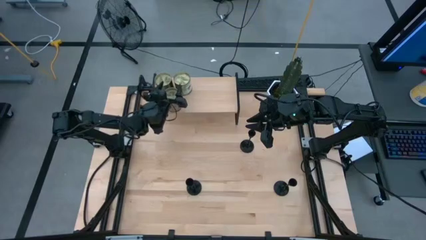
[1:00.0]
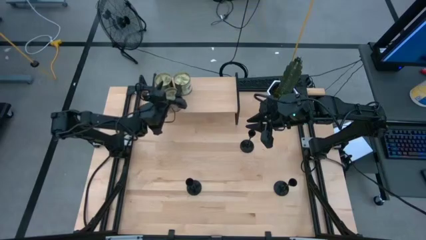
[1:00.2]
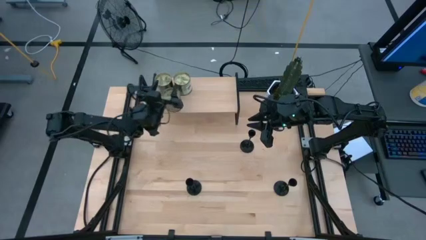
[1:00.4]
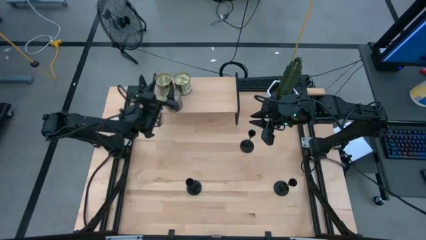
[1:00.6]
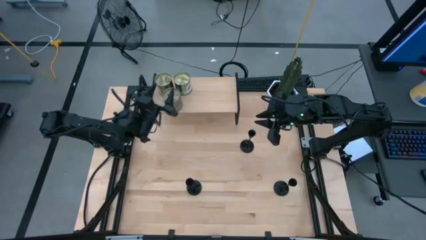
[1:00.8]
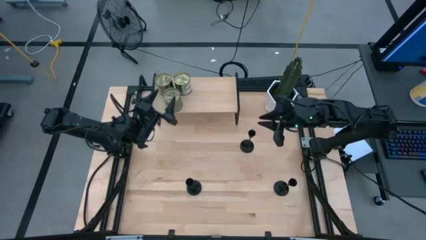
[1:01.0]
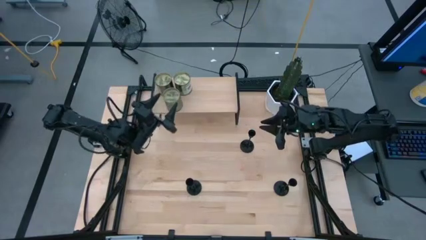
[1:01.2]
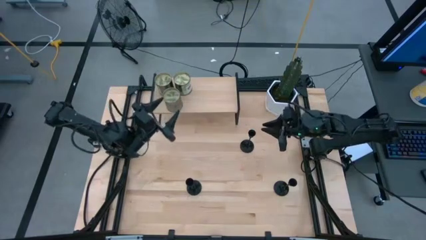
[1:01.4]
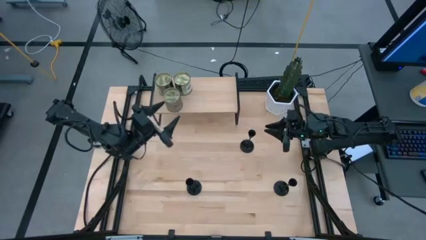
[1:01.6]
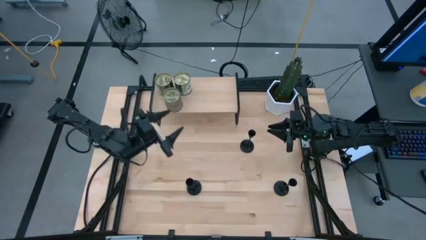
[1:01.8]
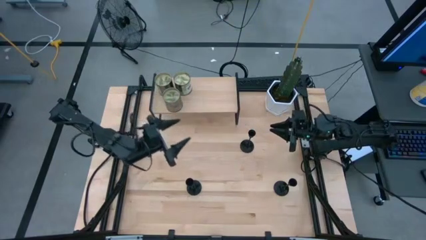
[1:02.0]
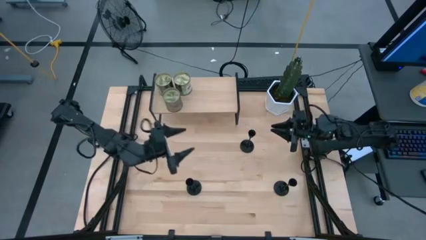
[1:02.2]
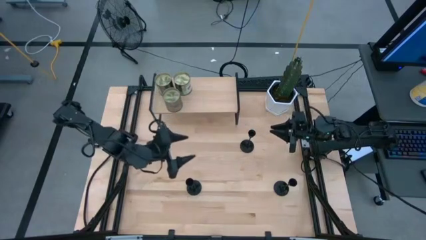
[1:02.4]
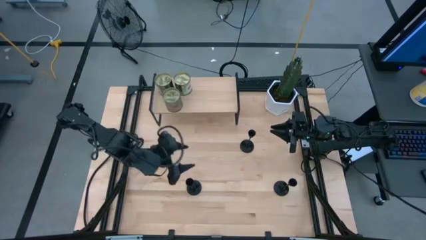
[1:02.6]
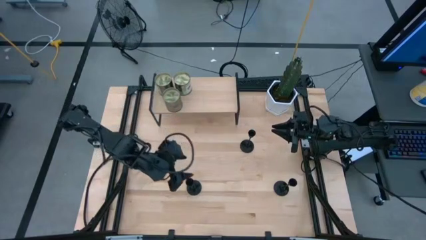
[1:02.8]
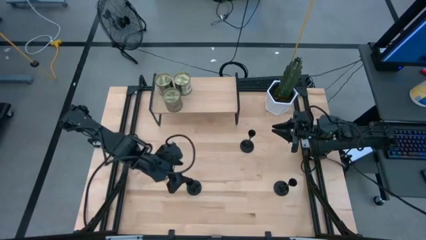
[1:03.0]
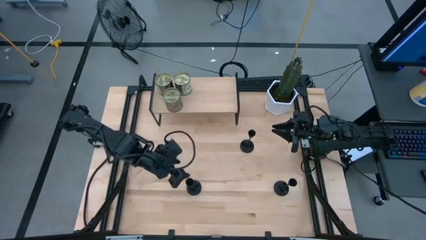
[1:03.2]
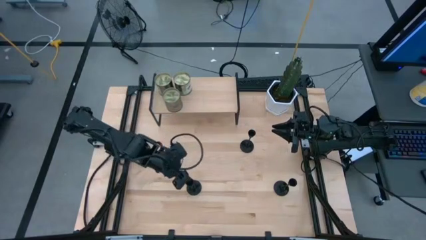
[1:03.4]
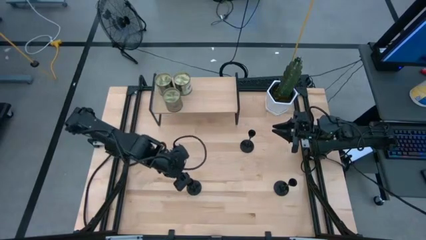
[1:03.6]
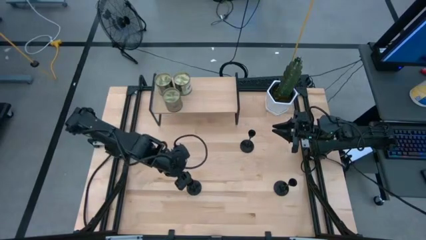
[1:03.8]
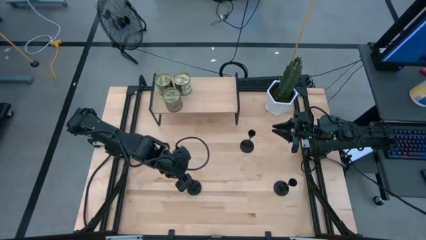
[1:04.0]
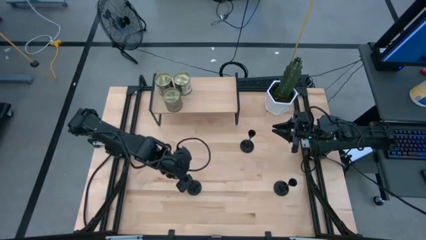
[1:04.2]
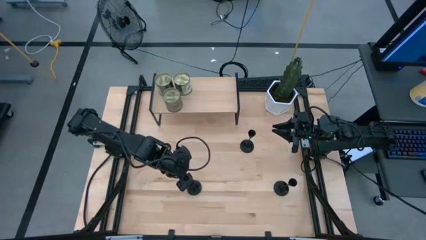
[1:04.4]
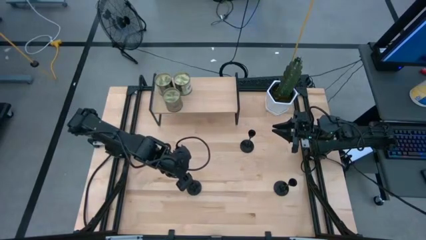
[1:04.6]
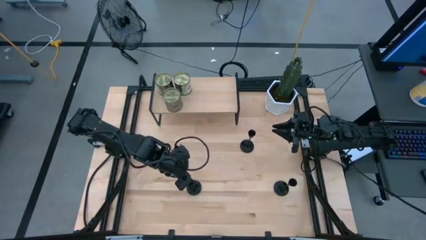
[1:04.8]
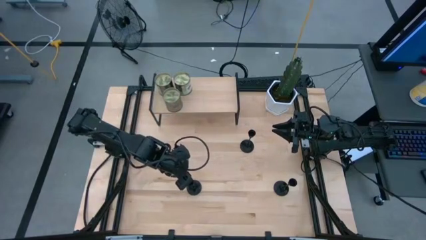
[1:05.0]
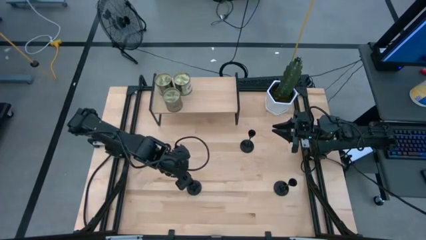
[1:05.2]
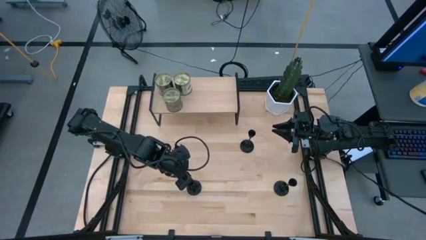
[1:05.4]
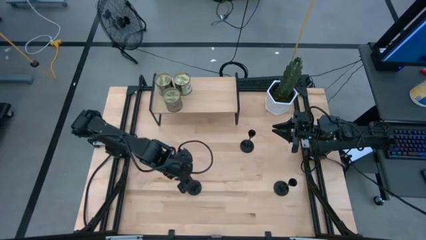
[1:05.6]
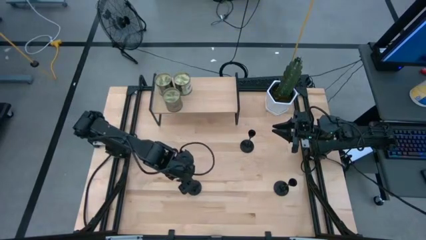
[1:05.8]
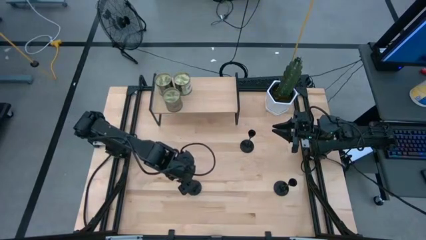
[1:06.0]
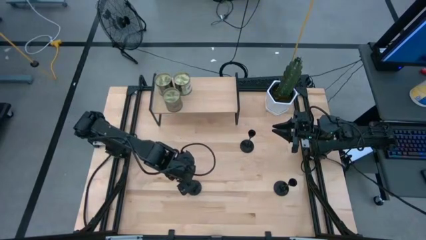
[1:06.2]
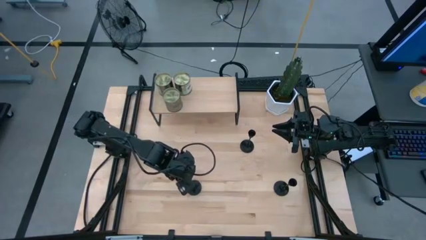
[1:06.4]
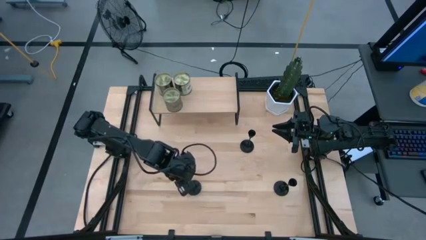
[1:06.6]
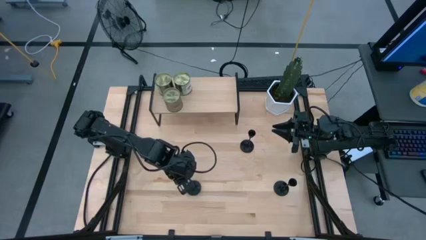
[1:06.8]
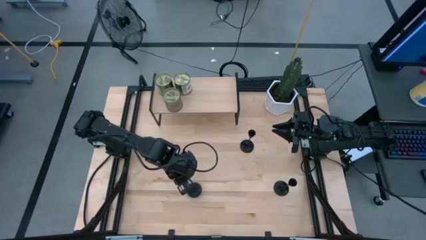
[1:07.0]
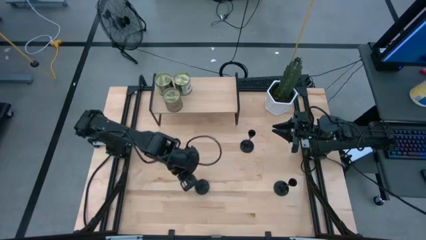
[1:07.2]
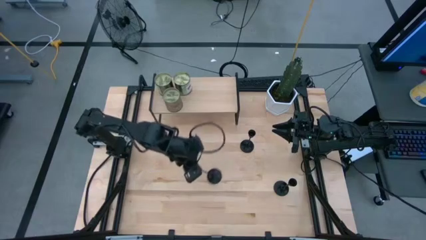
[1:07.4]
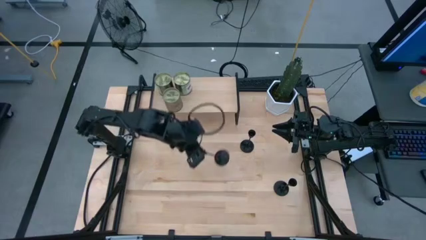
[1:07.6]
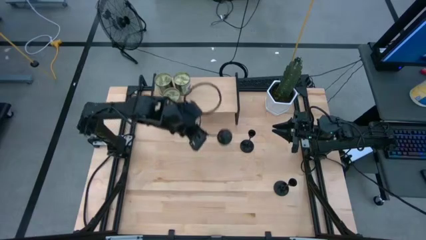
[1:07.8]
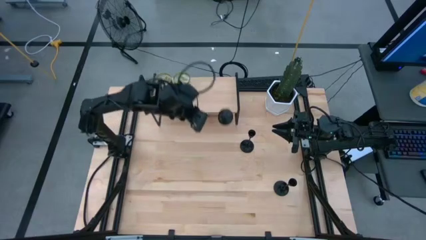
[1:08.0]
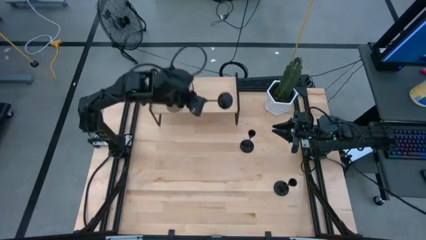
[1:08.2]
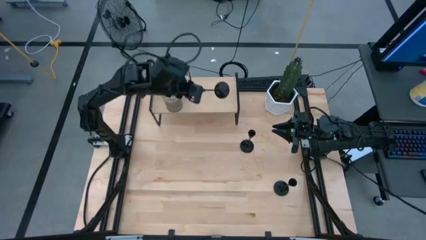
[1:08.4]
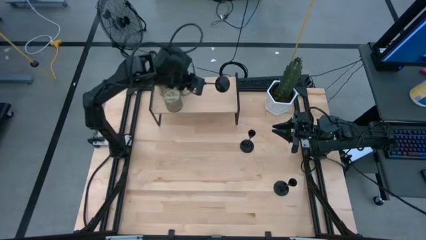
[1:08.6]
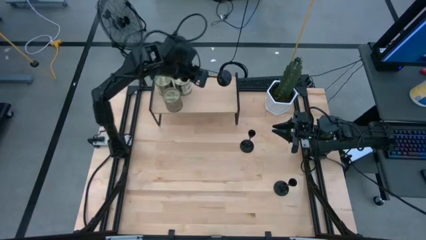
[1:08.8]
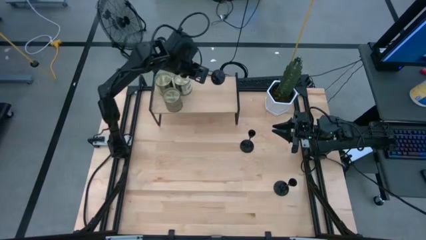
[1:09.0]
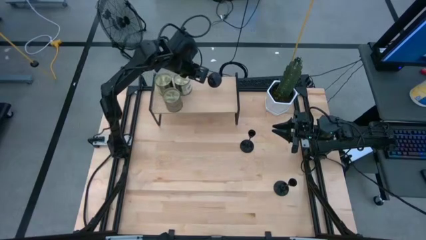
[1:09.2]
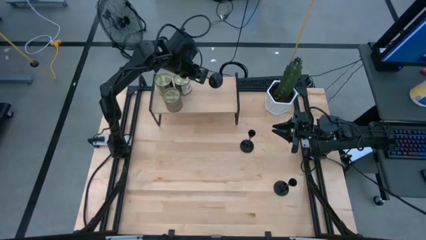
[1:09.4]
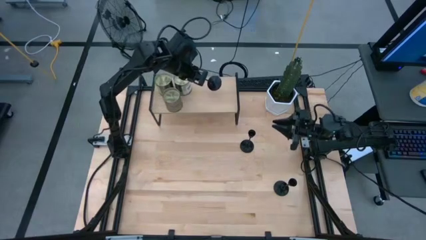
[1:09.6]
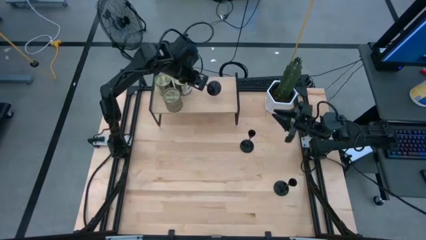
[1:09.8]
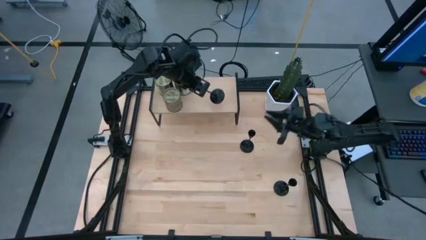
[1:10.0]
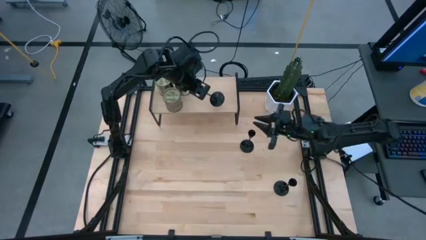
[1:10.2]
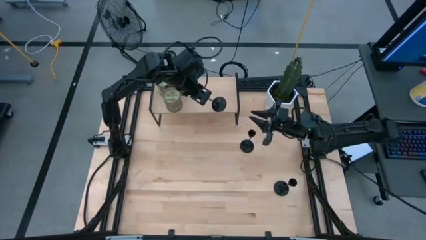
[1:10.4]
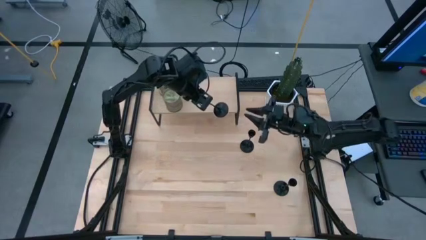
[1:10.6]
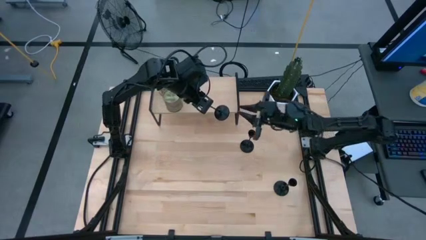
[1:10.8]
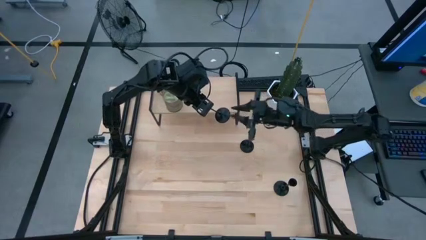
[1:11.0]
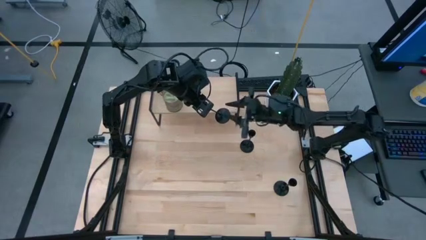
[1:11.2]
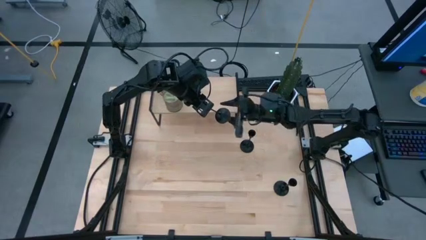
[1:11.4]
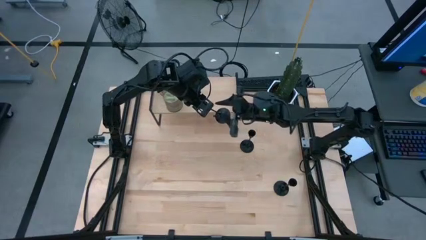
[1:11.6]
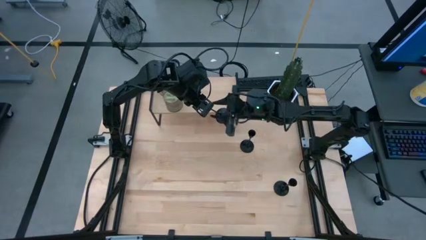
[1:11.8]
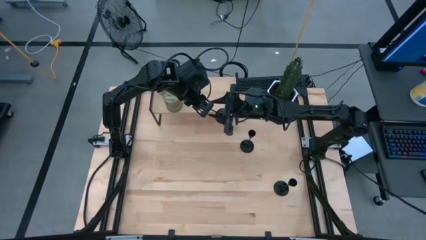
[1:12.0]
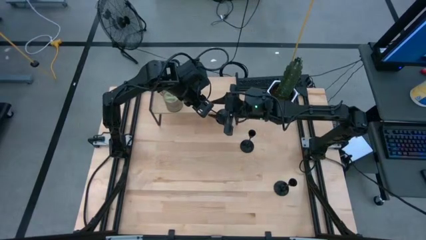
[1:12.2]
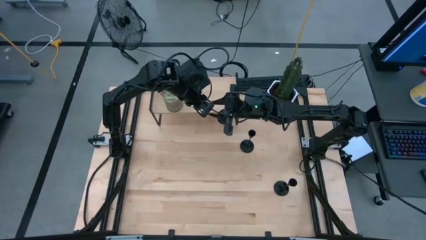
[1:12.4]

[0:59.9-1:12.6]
Task: Pick & Place candle stick holders
Put the bottom left black candle holder on the shelf

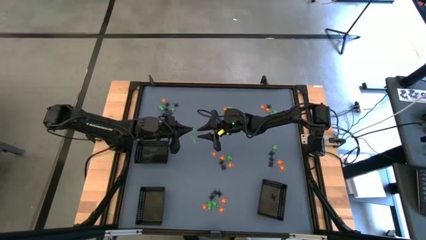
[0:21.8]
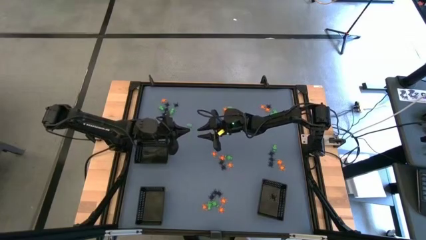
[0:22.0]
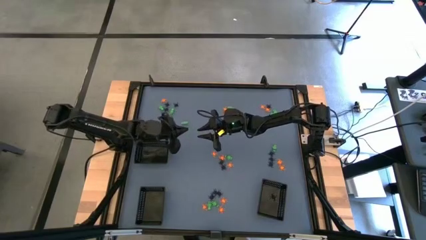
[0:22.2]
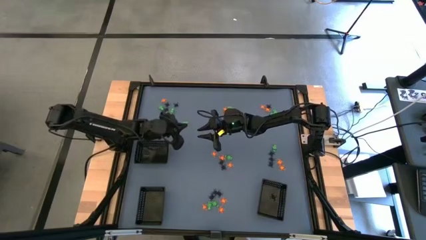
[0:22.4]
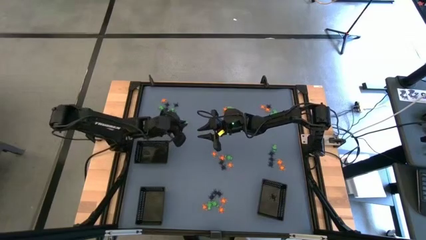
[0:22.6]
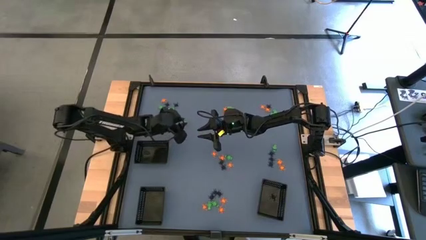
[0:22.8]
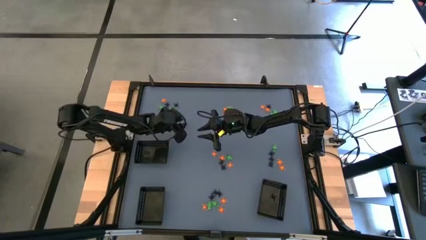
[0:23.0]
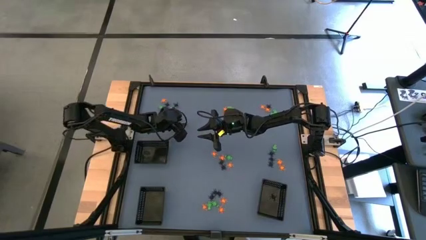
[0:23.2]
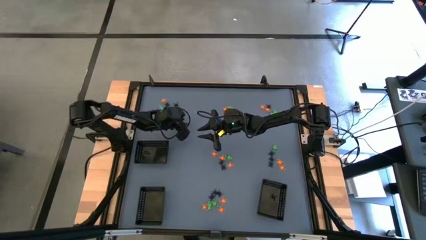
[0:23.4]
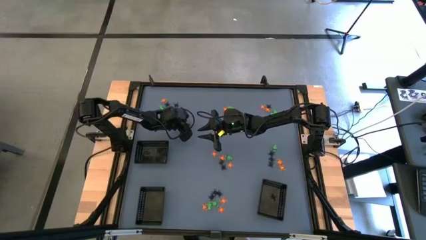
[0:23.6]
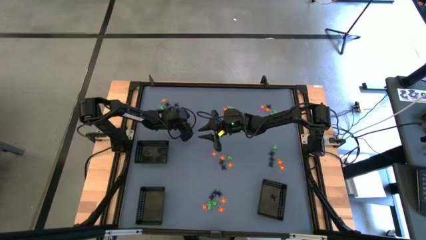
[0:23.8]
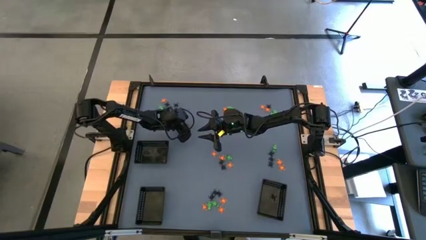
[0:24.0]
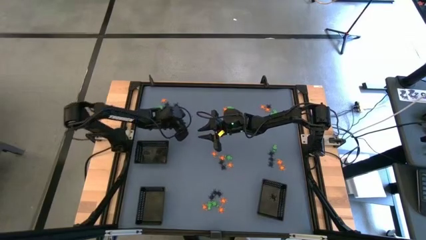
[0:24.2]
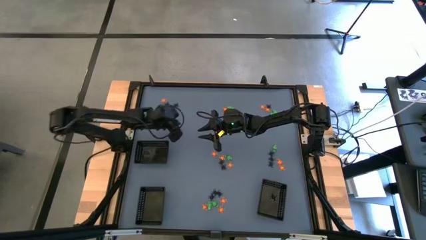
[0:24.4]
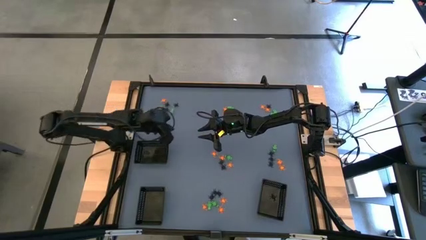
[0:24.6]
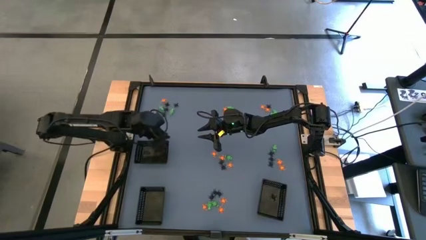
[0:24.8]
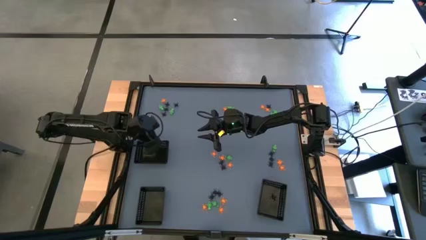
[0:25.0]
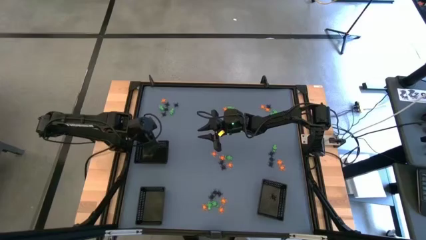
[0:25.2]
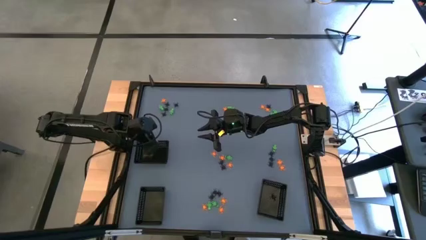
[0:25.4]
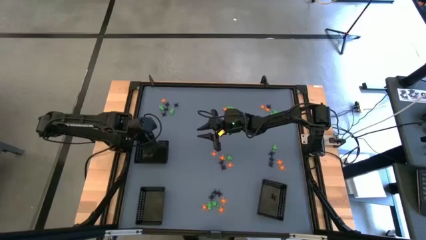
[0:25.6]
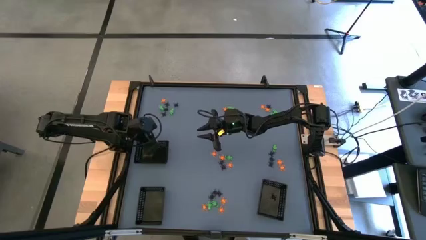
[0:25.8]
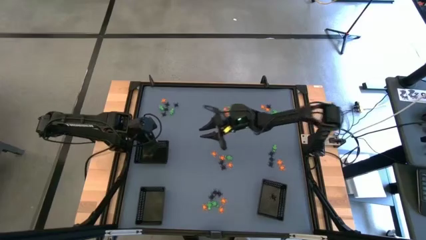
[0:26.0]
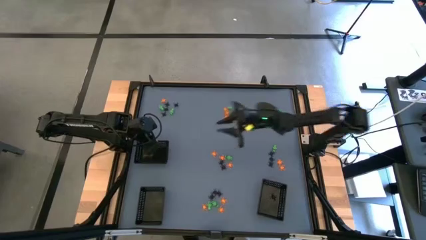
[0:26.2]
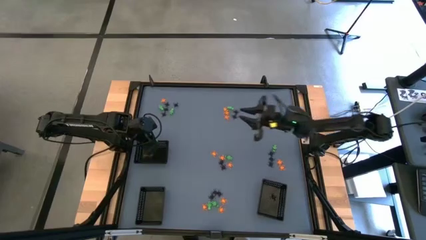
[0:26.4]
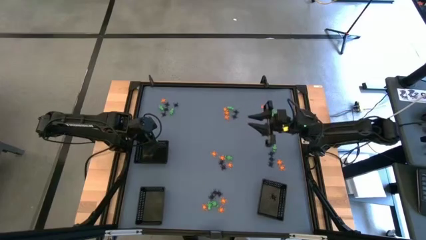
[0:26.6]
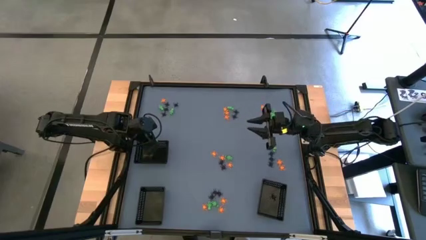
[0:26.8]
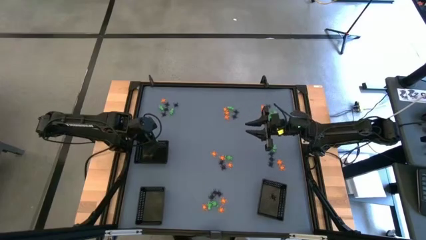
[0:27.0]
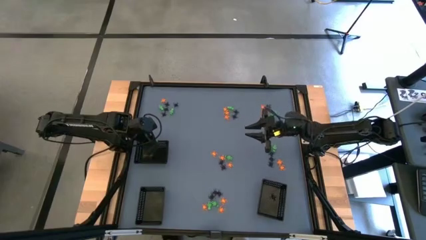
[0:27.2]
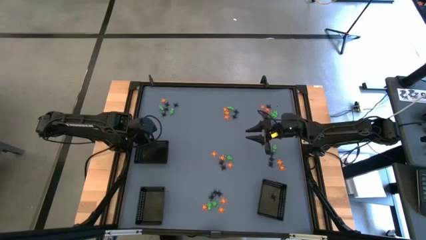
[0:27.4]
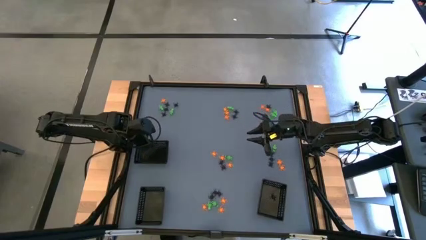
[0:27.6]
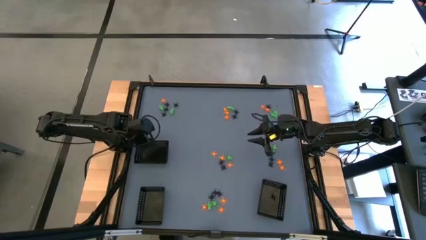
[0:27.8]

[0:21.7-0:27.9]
Task: Sort Halloween decoration
Put the green skeleton toy into the top black bin
